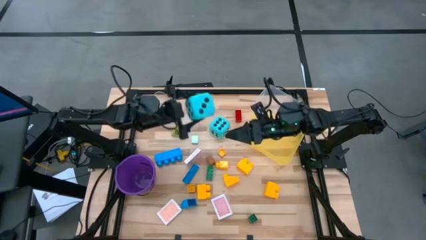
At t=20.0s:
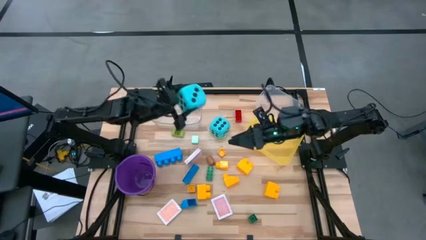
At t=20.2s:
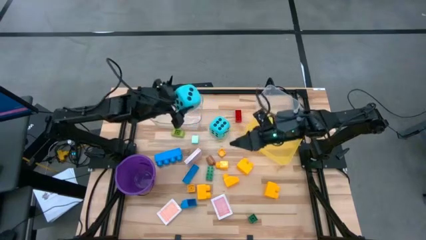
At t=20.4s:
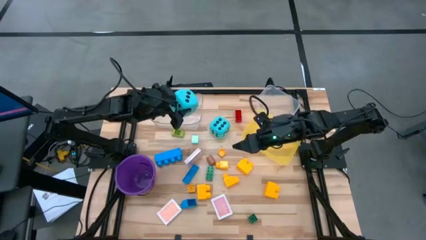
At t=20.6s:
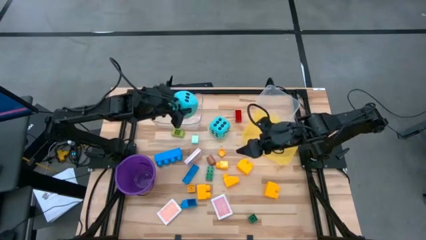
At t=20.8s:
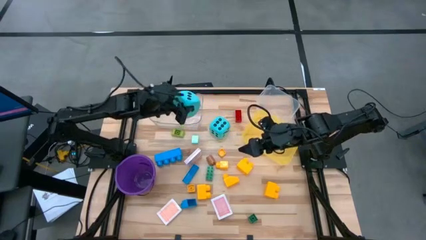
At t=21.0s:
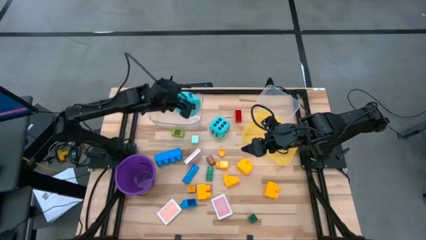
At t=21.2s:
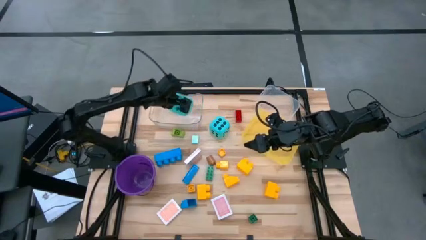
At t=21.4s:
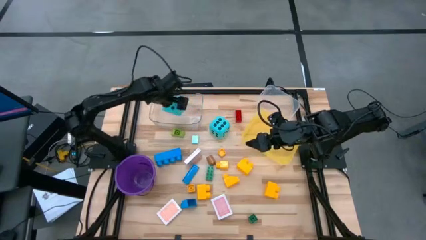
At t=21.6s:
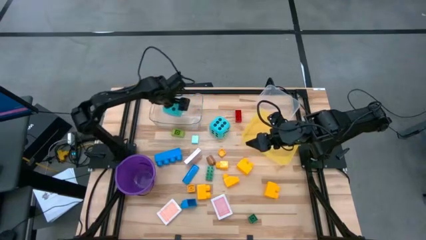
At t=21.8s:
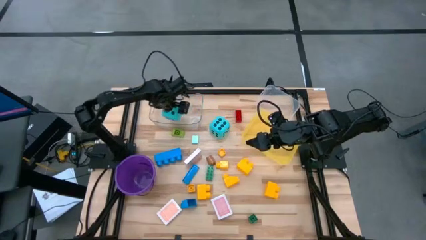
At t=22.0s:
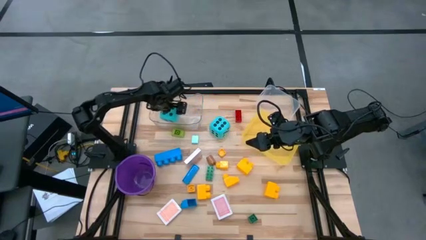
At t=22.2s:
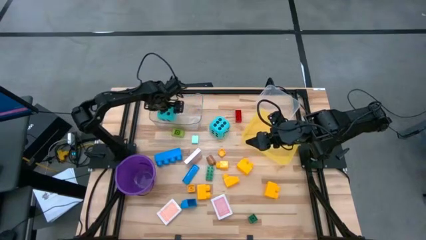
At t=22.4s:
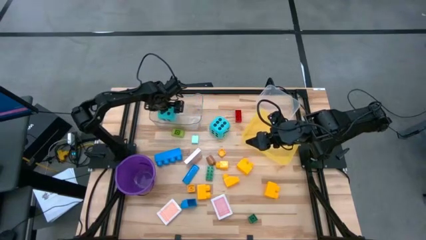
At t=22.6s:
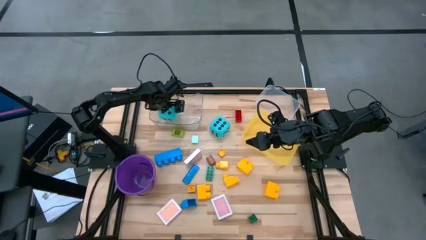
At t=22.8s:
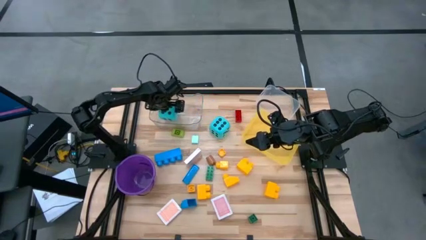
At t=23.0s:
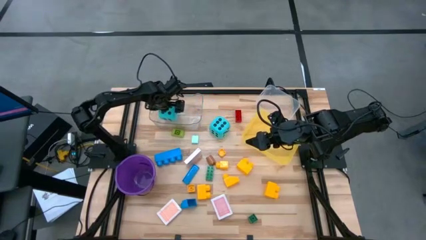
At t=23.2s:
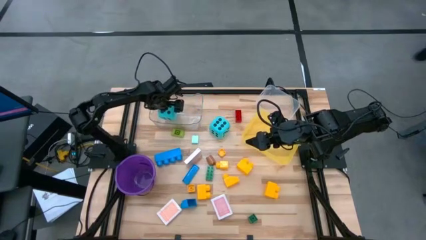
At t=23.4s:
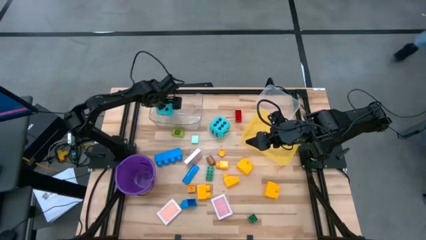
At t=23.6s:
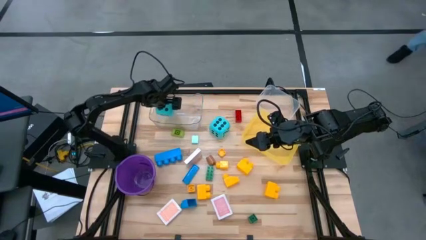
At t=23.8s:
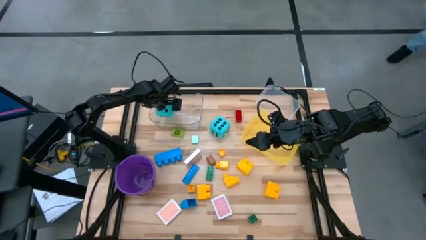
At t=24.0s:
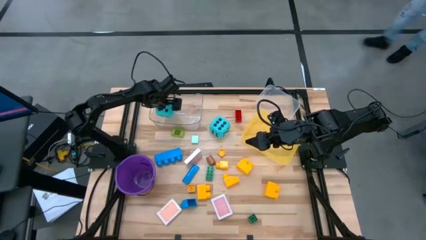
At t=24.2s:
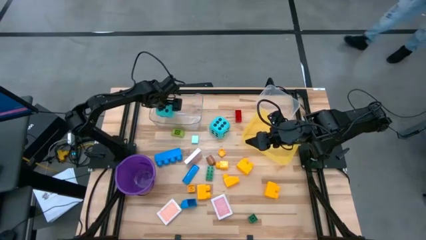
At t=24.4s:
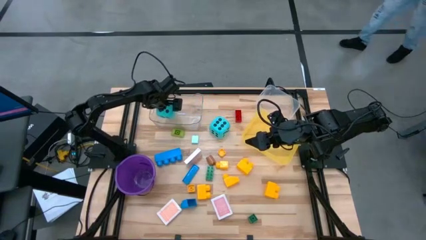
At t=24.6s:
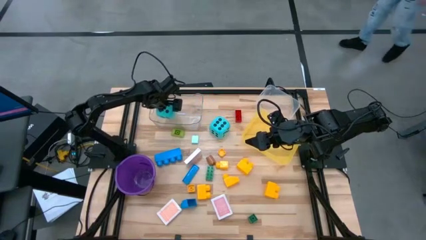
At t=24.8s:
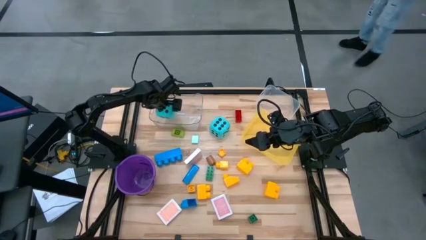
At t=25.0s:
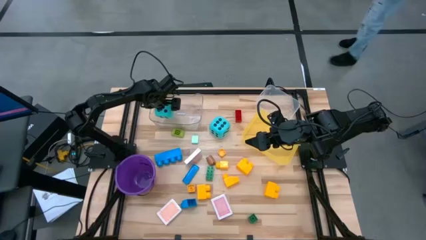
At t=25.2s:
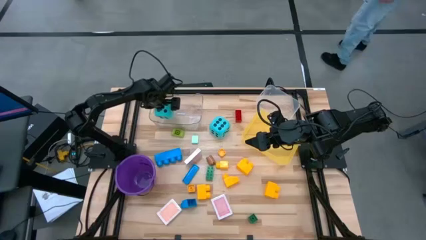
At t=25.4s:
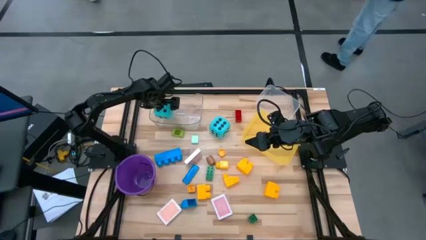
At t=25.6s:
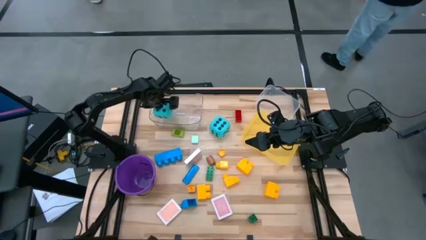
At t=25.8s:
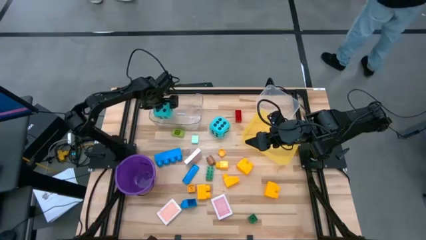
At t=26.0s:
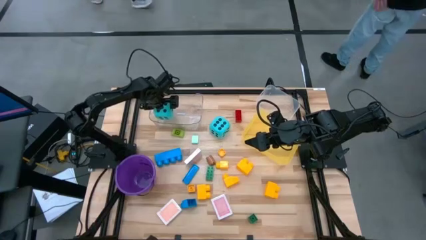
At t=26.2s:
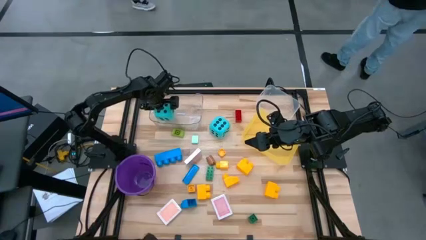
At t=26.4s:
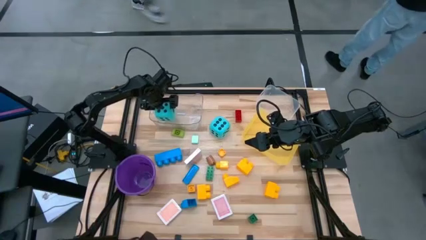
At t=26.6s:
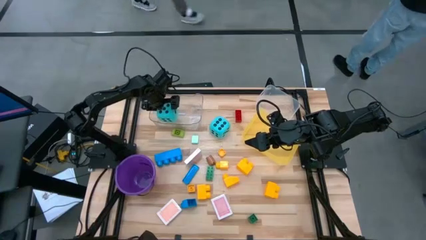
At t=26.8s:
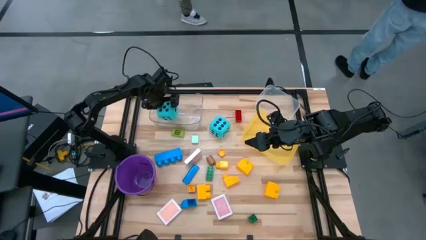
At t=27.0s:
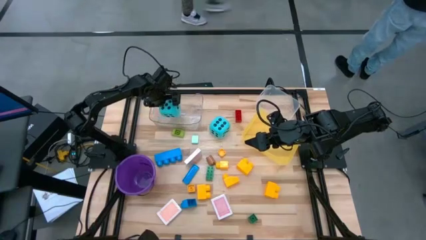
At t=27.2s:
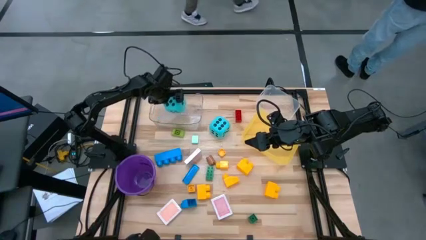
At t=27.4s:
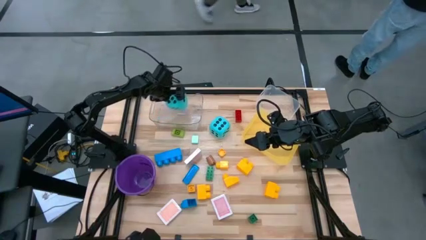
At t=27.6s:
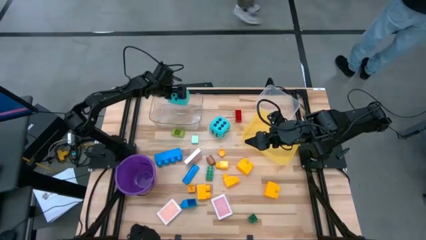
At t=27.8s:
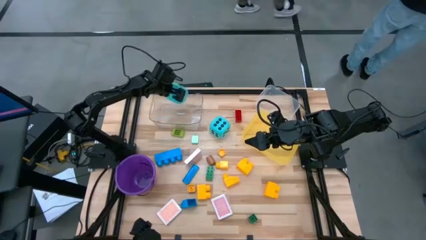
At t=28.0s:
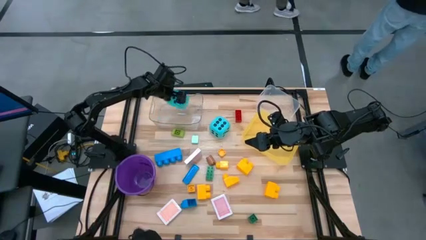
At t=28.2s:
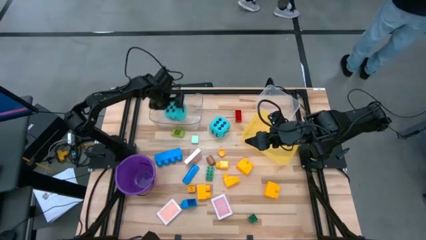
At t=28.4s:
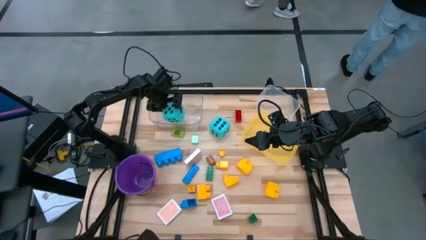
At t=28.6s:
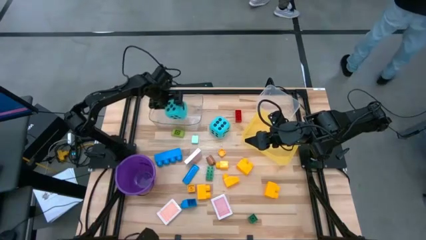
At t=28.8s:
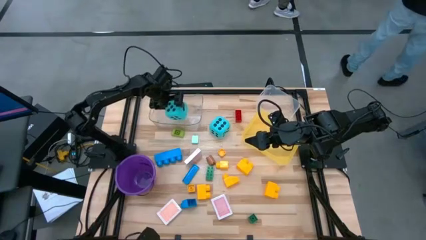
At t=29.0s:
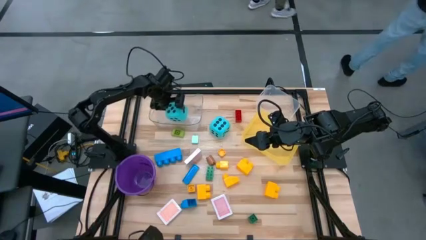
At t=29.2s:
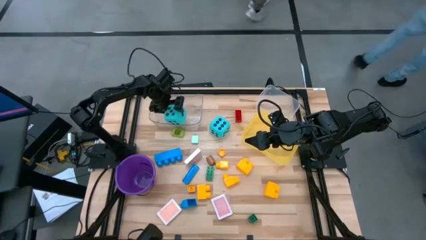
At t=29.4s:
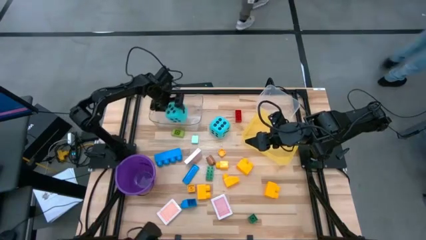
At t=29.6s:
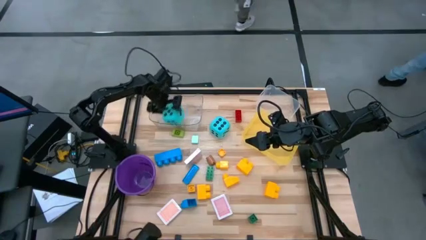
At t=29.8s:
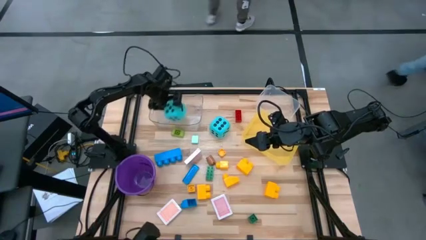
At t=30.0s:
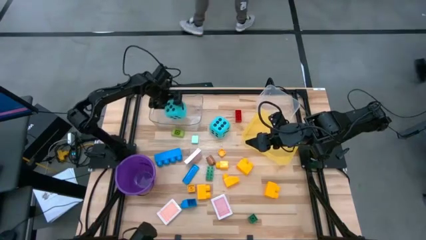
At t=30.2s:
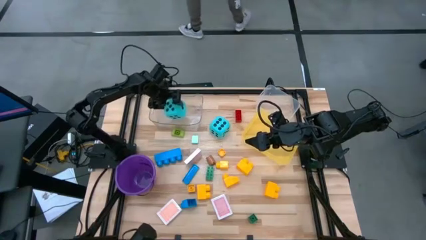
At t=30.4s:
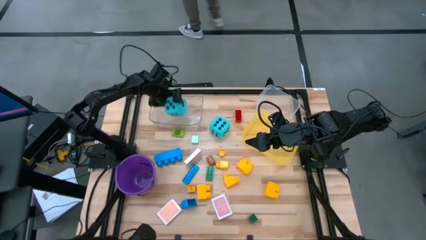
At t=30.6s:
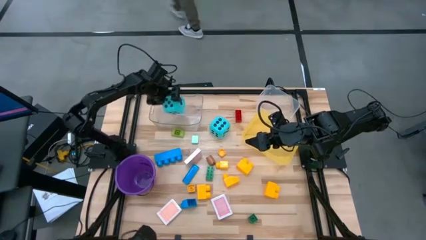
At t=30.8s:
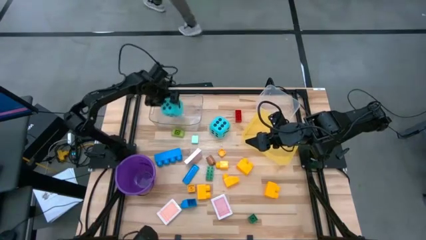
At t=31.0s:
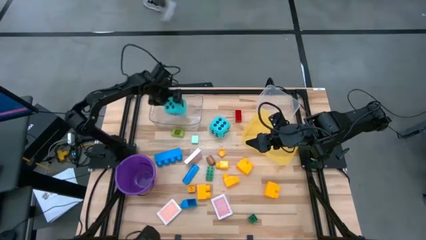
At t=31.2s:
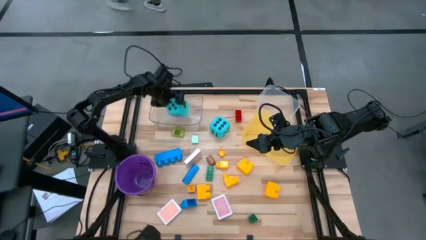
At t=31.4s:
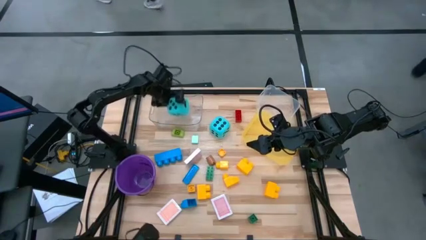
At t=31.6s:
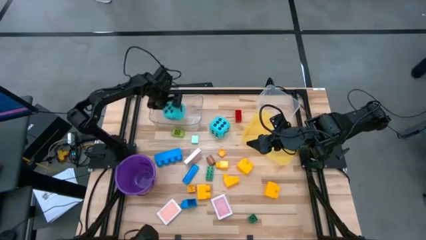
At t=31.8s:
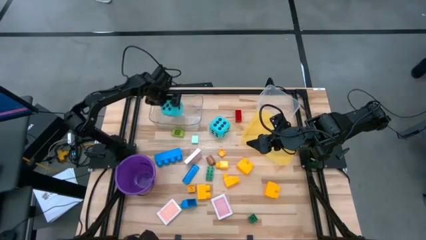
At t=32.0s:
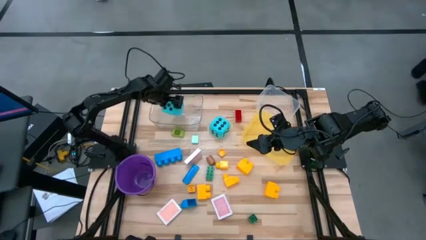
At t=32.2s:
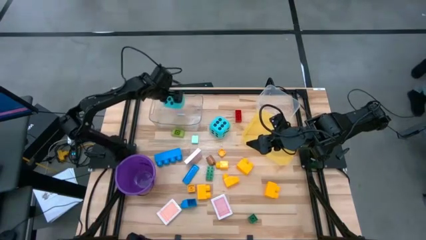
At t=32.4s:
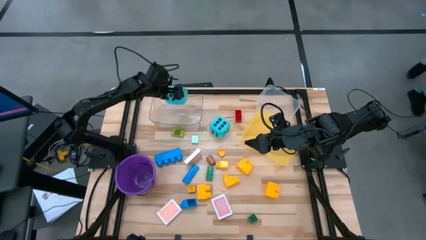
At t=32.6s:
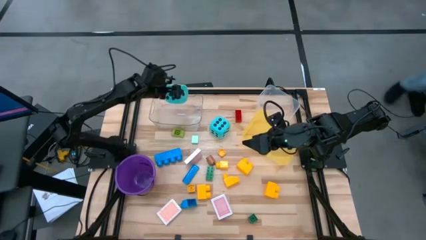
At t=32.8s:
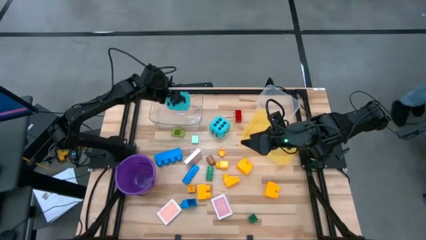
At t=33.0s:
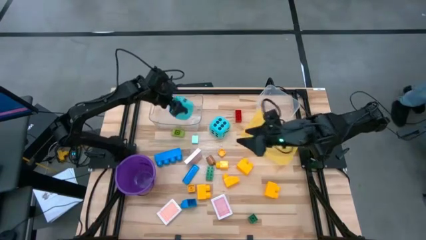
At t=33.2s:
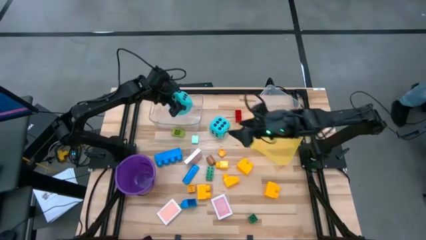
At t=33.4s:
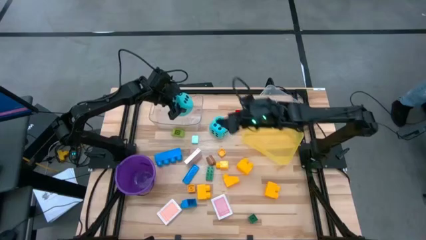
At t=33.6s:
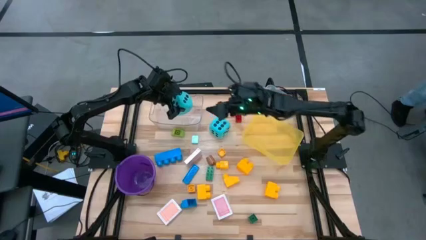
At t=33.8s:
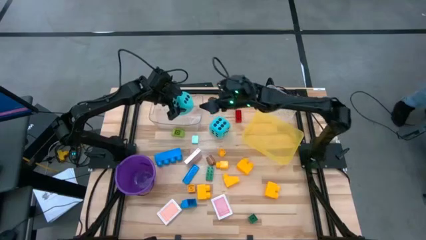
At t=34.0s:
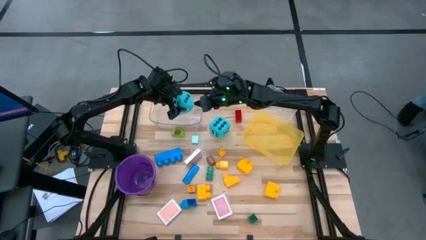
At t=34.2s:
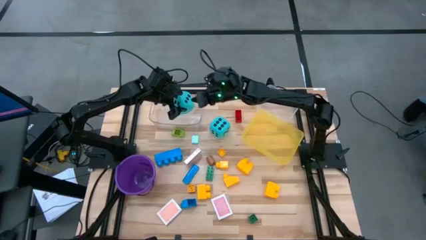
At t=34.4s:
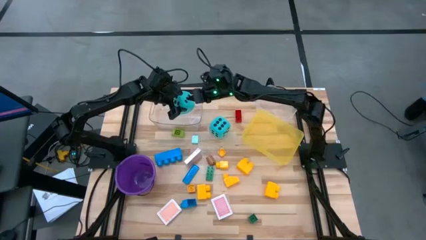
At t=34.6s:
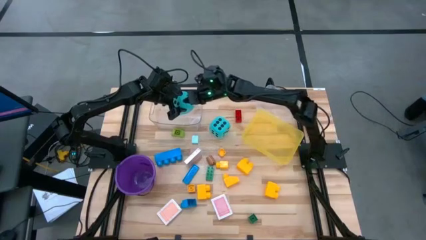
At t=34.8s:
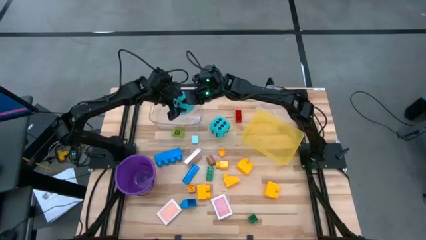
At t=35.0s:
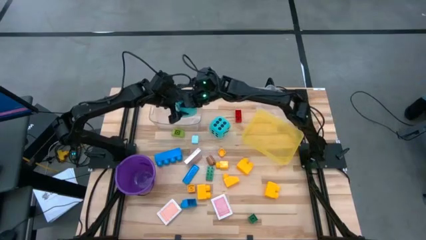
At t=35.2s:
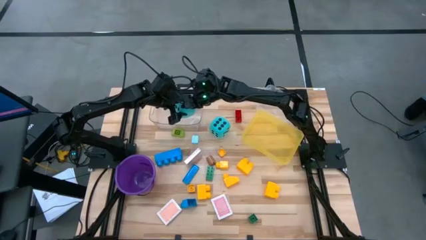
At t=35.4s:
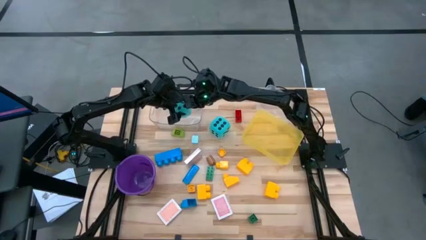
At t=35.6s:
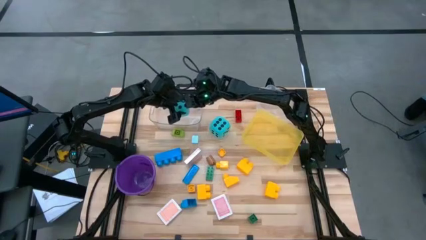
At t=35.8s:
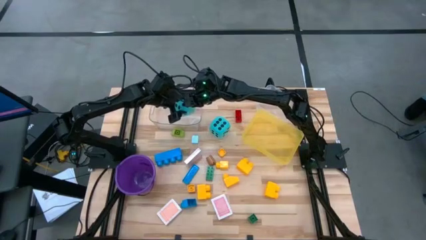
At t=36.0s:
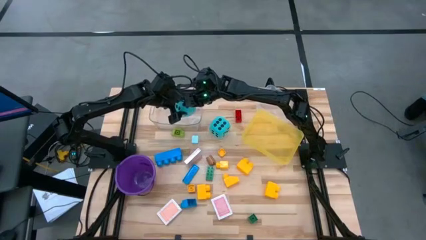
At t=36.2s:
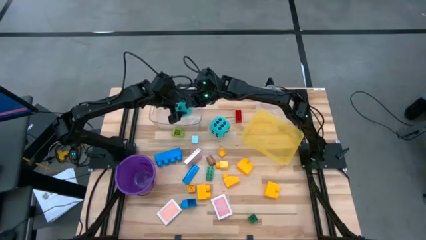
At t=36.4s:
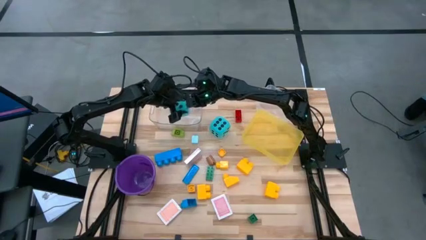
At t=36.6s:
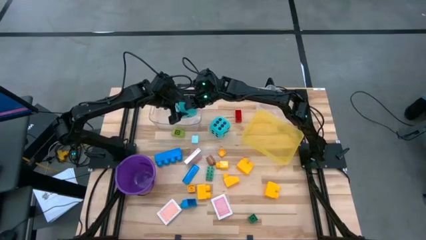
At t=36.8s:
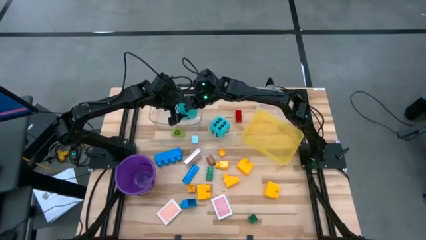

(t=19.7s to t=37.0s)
Task: Pick & Place Toys
Put the blue dice into the transparent bin
